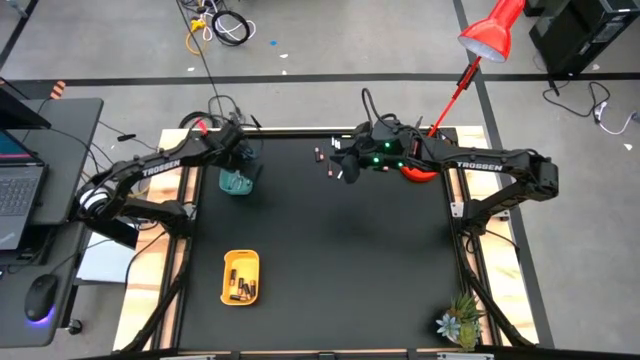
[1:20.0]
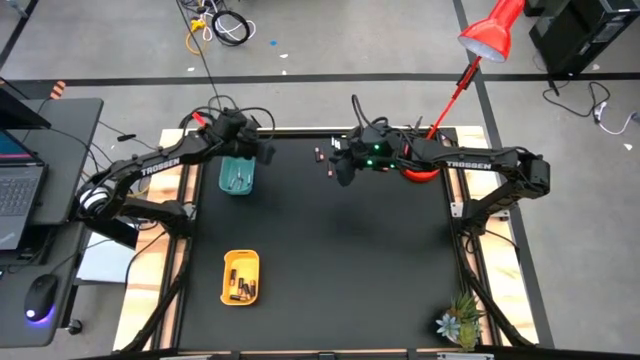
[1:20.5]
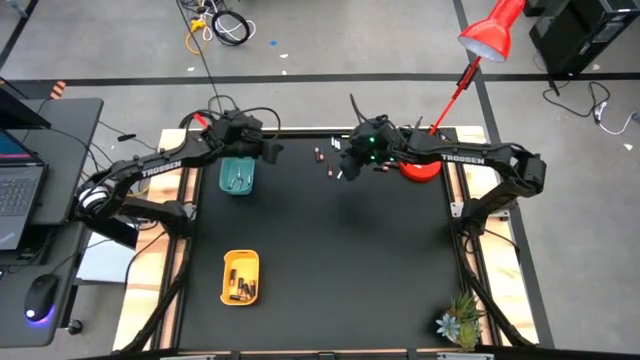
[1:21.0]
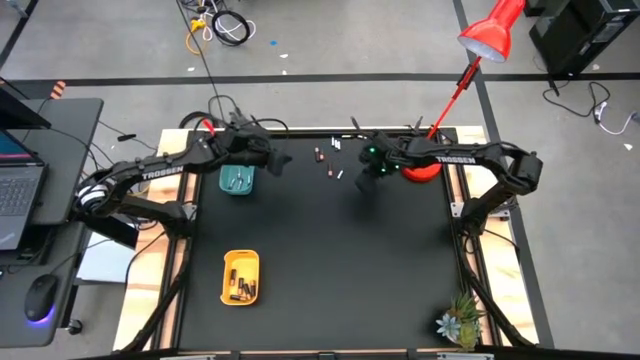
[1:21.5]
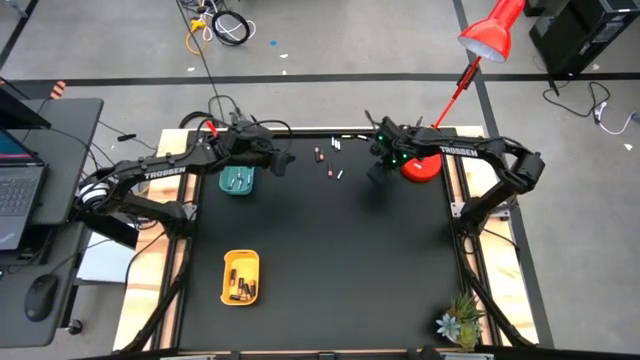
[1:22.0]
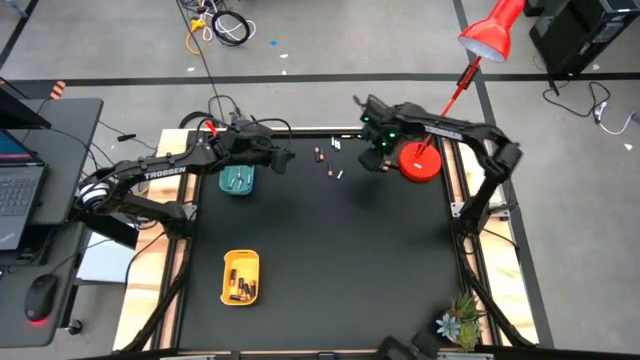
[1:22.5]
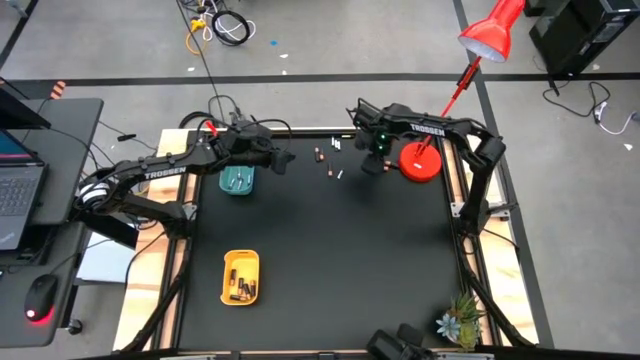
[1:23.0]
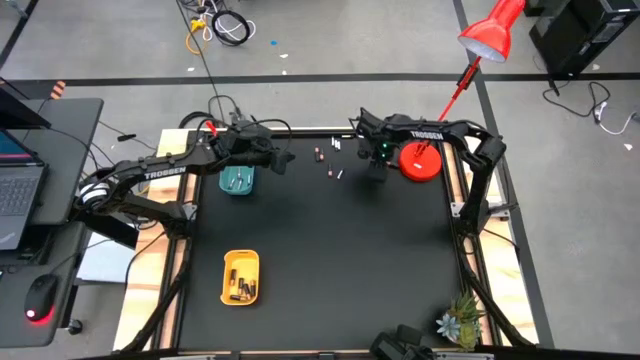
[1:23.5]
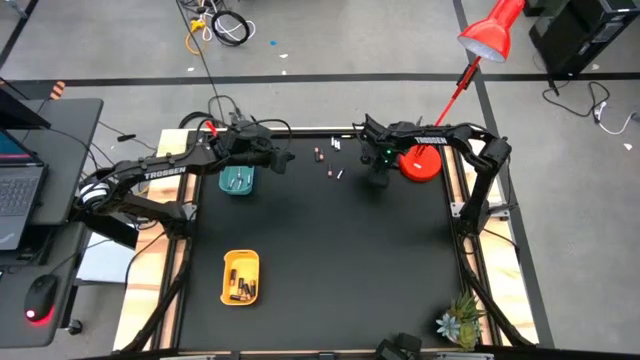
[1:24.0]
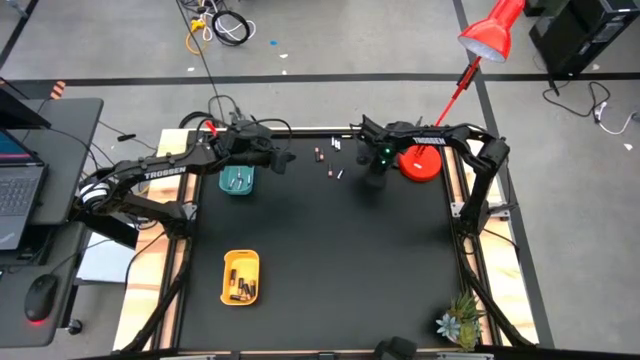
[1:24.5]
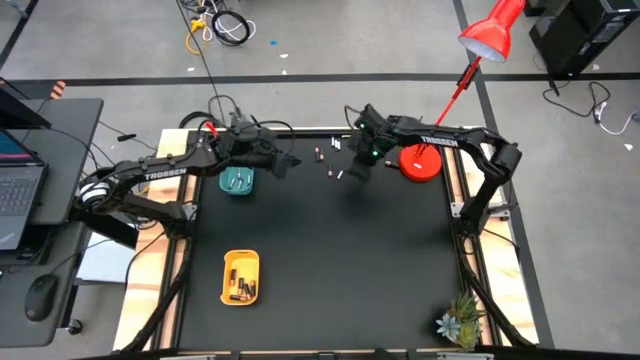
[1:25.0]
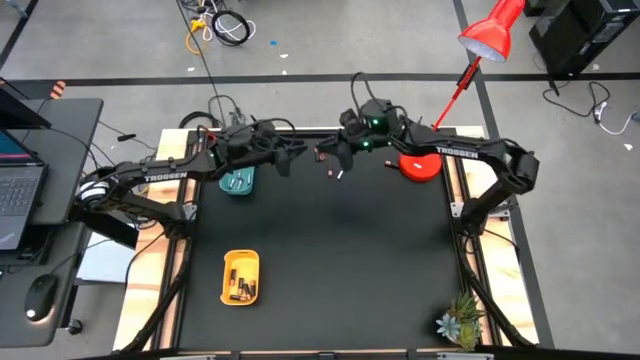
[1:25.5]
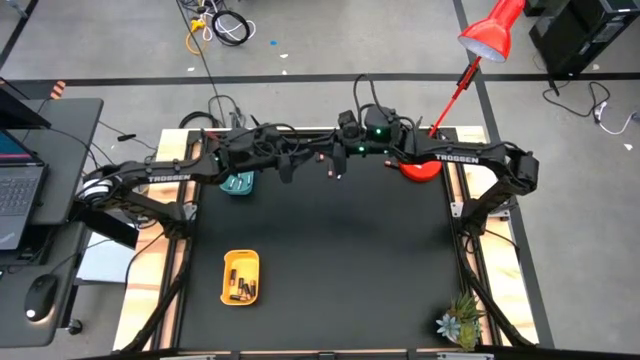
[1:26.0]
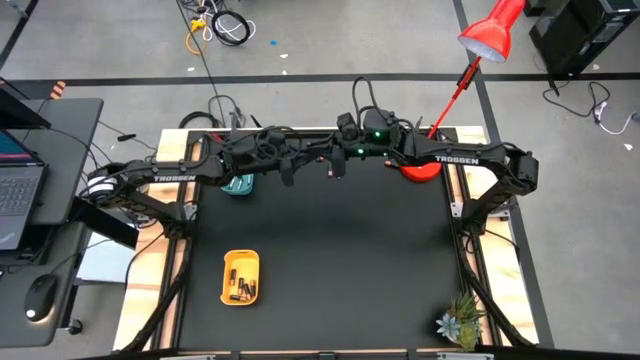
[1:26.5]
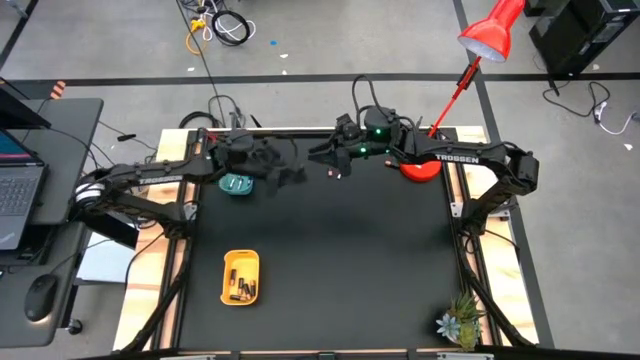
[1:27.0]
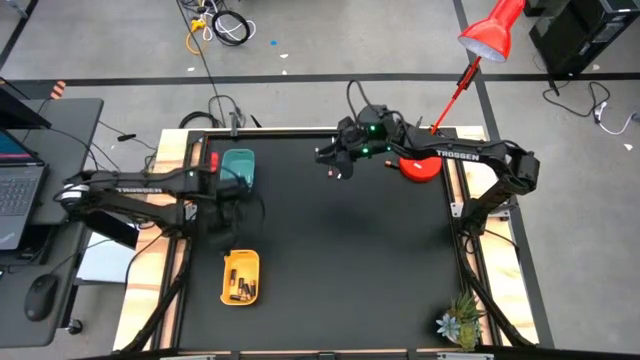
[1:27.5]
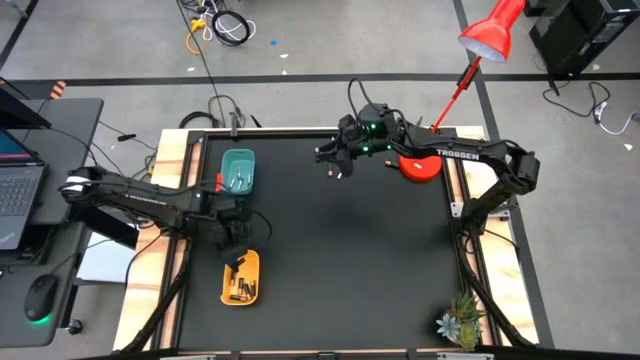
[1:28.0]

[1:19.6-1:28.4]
Task: Sort batteries
Put the black battery into the yellow bin

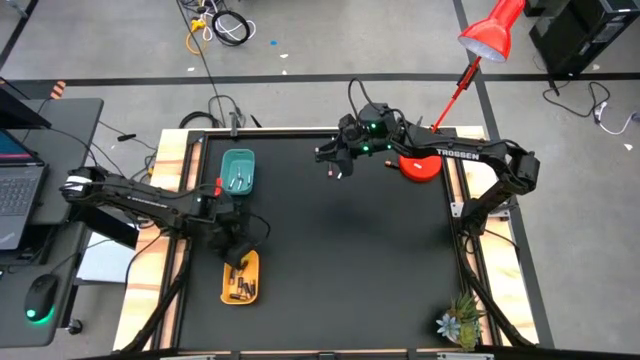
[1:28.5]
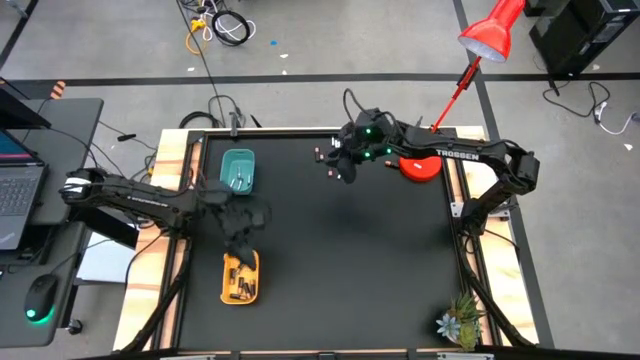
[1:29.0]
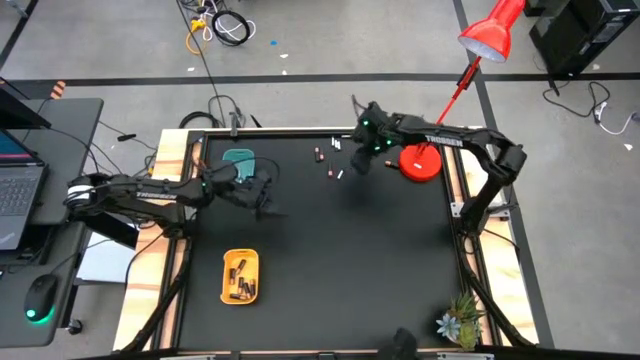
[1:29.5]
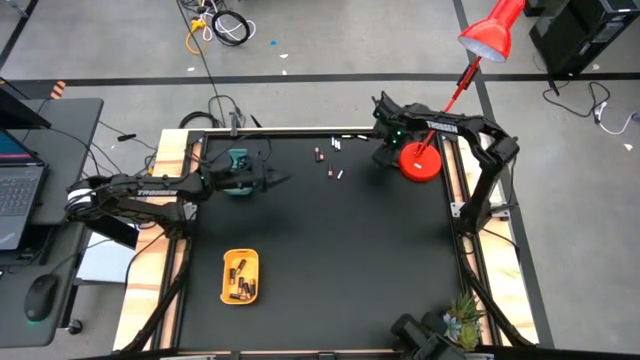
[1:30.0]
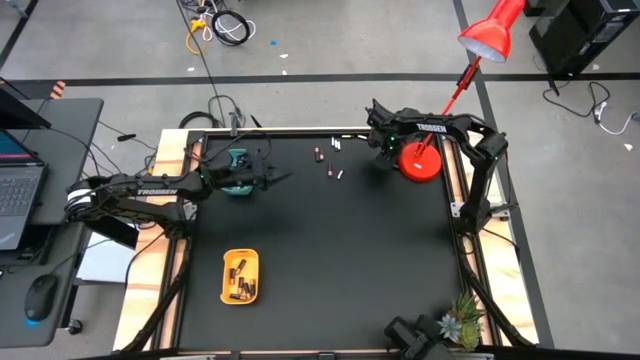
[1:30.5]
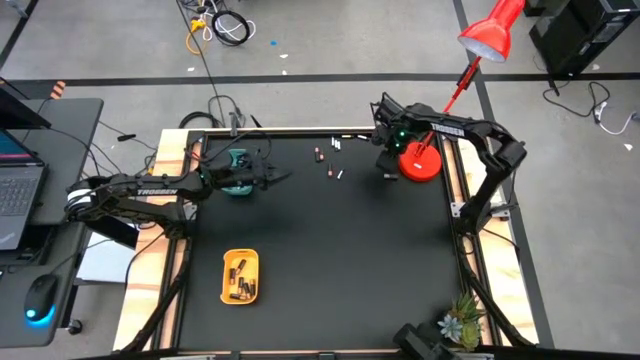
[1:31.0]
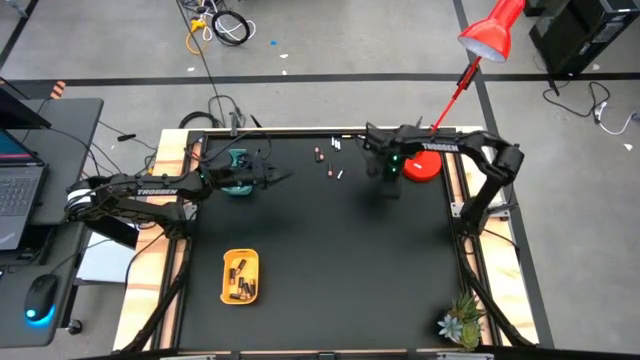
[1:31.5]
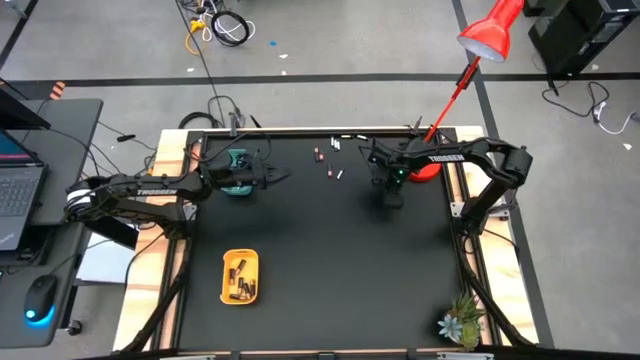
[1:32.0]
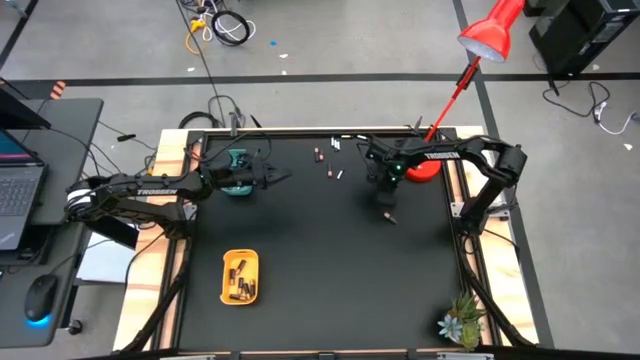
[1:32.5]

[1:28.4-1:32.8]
Put the black battery into the yellow bin

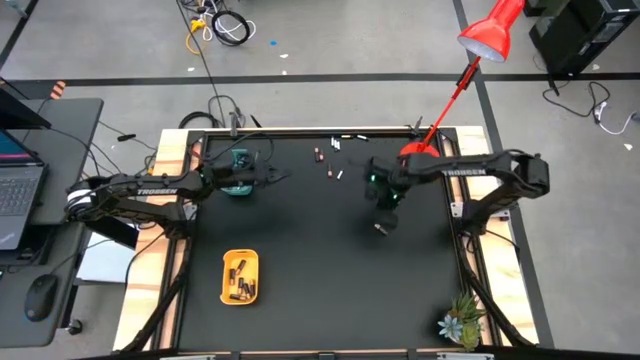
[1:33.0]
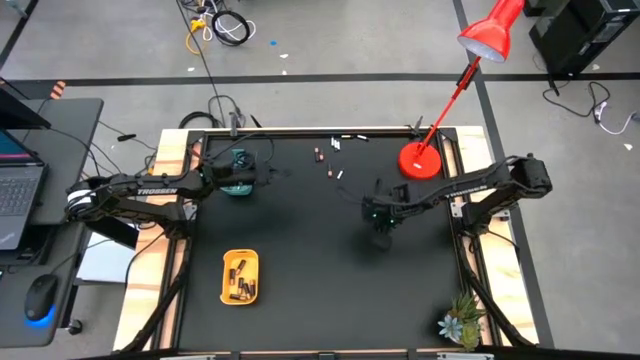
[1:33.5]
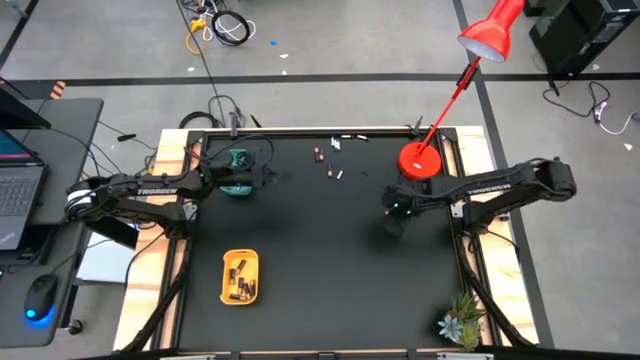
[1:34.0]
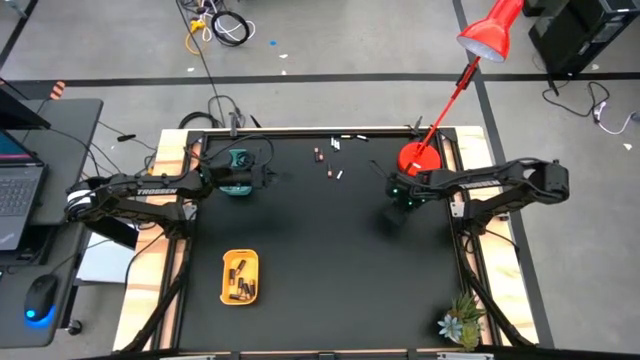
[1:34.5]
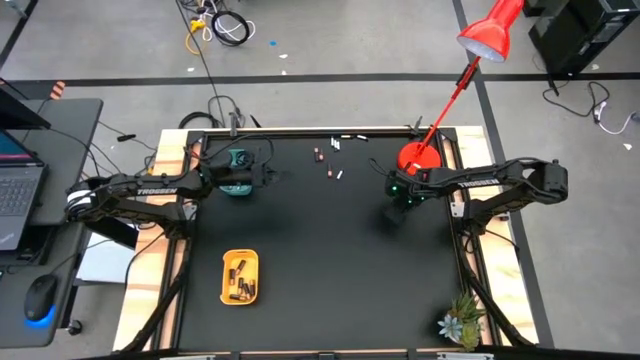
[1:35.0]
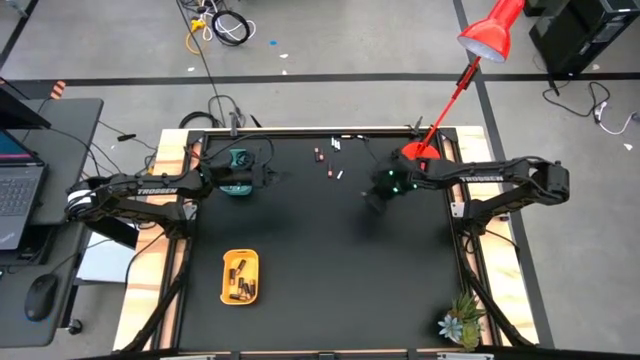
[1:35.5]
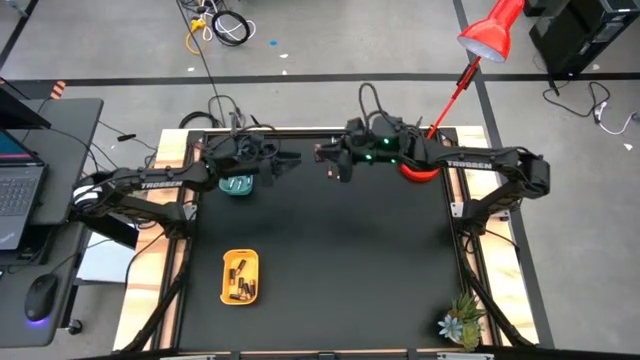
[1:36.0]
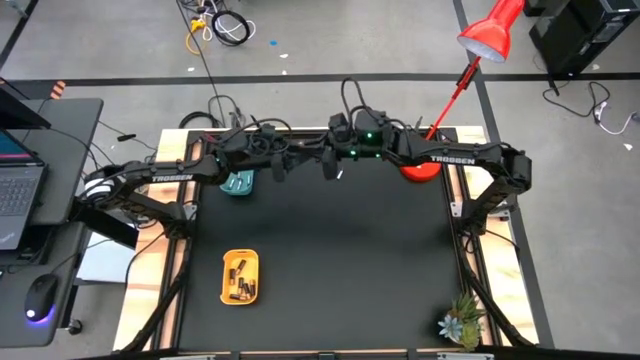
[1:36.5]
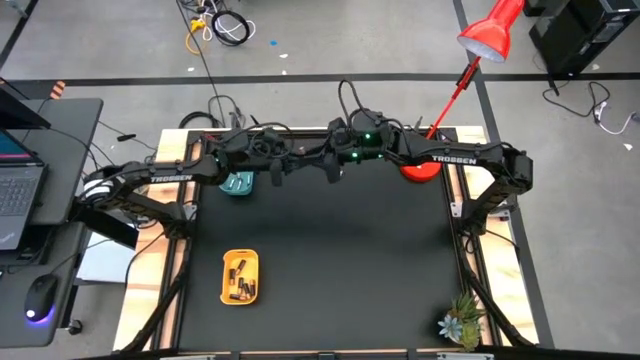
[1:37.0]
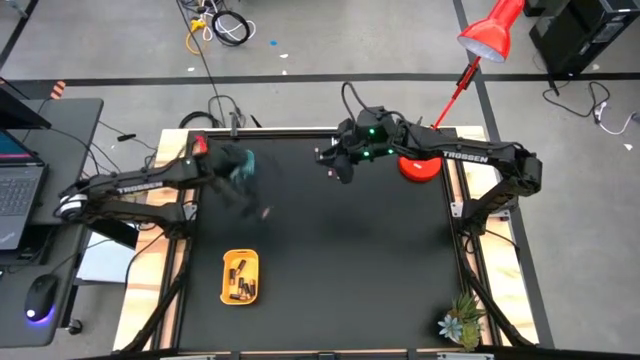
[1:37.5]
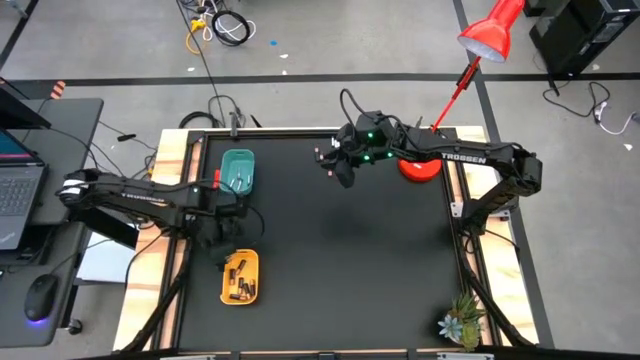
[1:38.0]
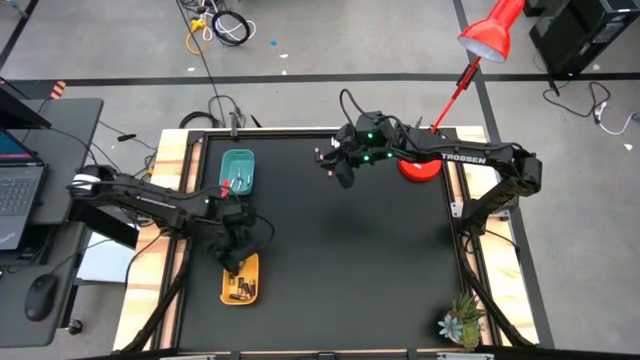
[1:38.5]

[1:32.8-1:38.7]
Put the black battery into the yellow bin
